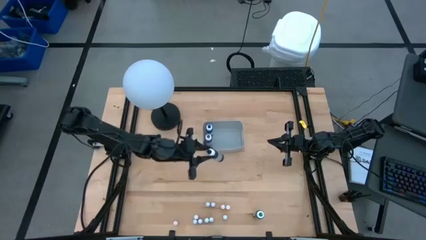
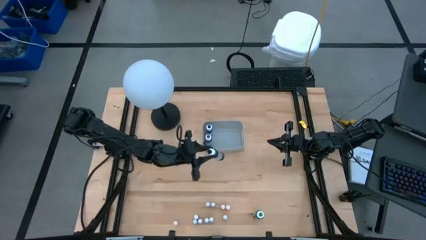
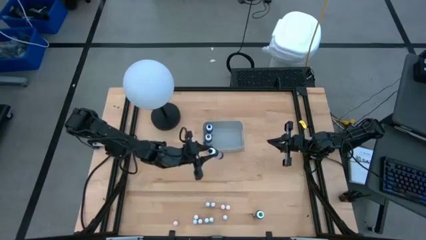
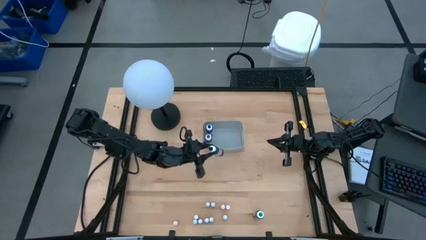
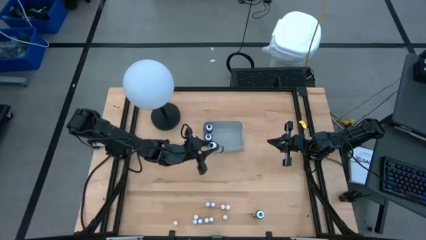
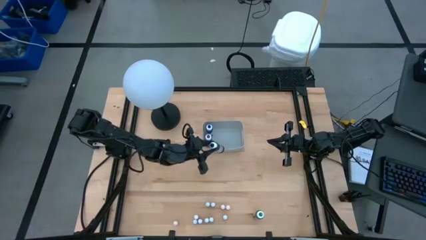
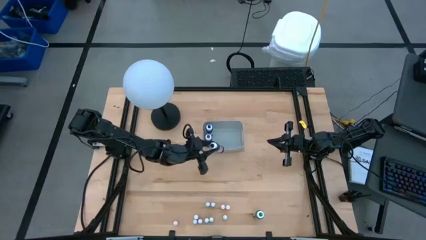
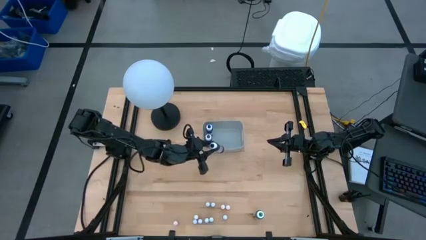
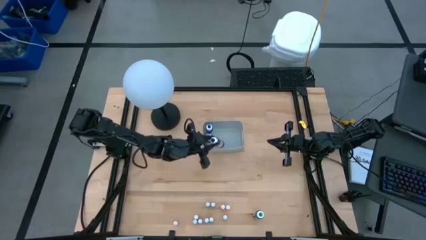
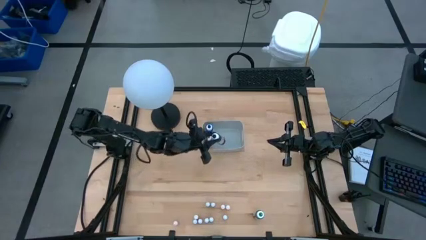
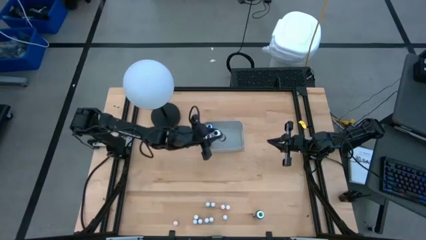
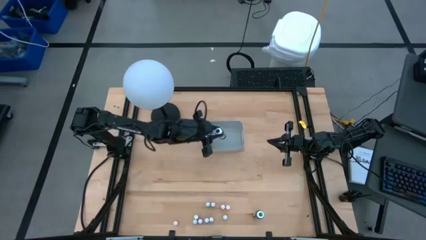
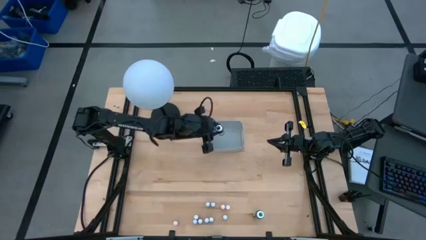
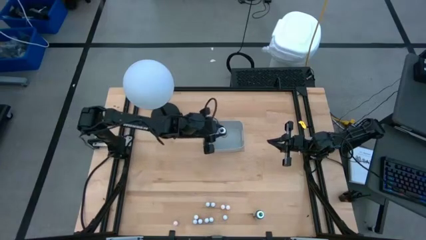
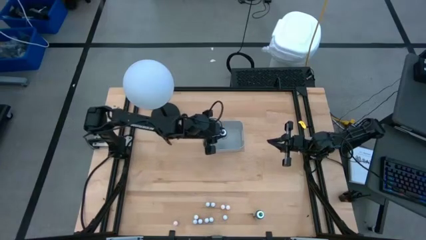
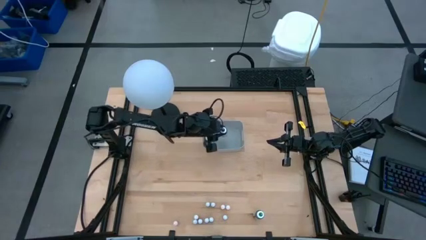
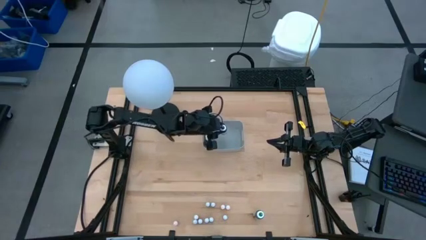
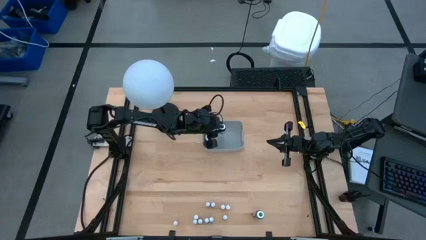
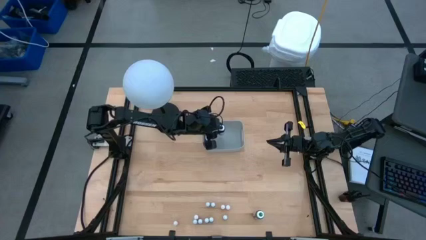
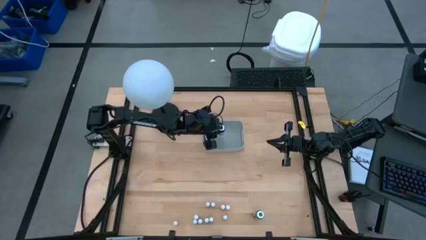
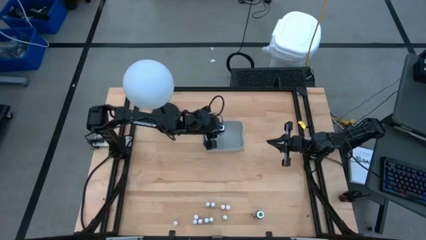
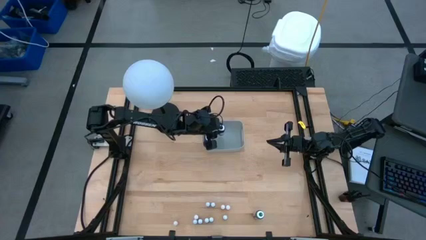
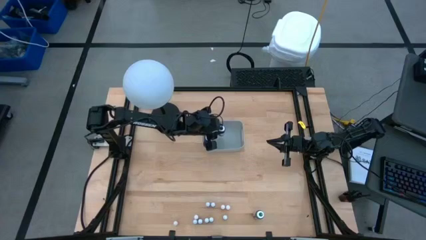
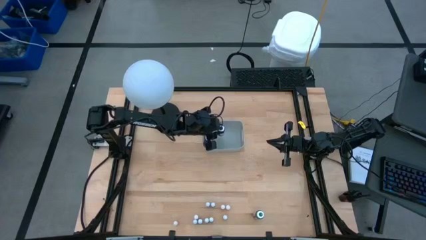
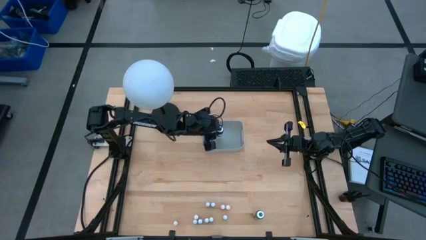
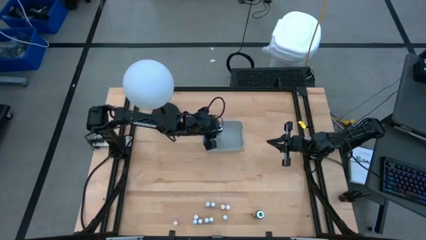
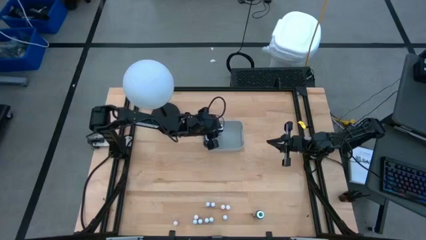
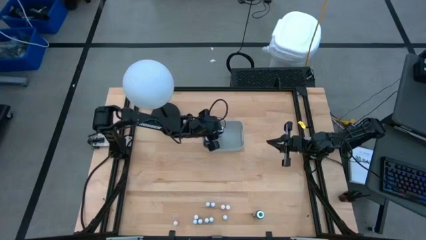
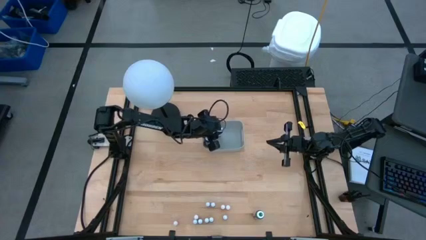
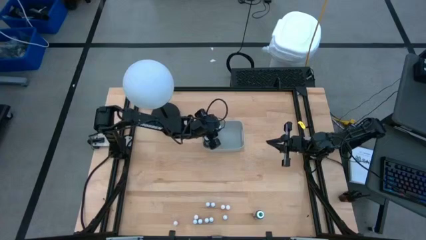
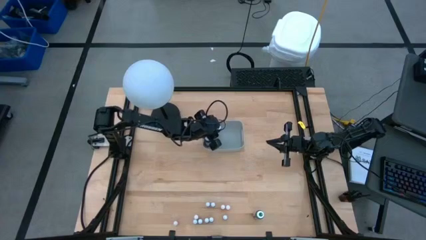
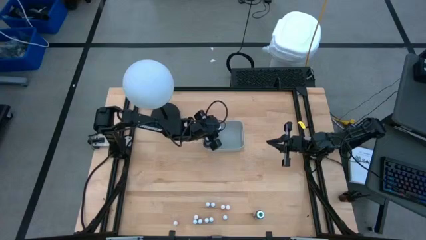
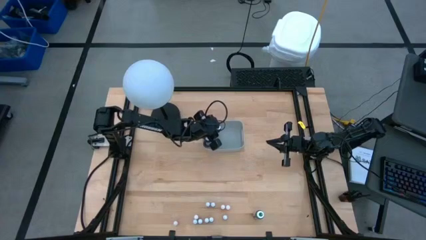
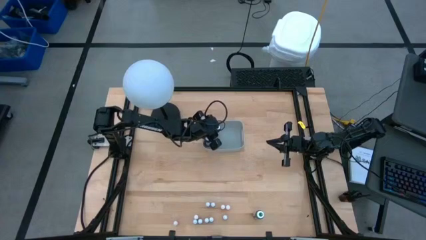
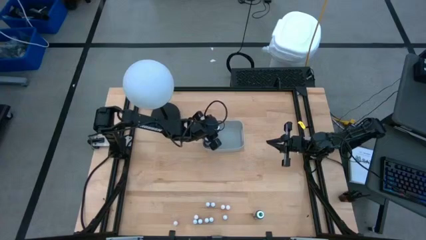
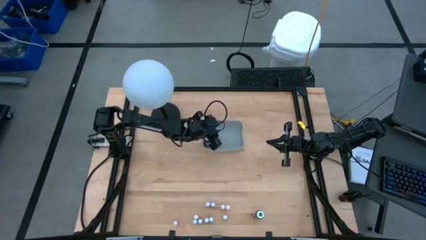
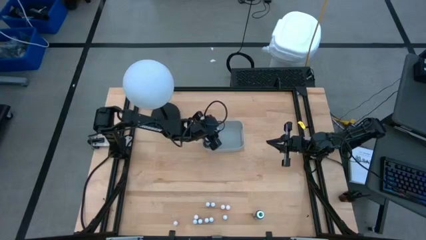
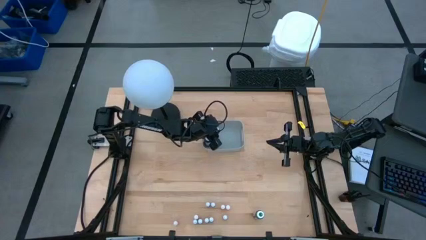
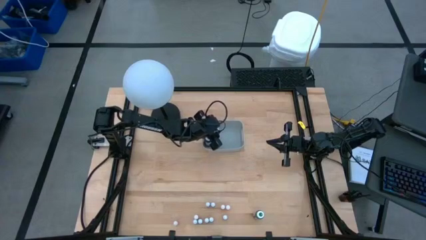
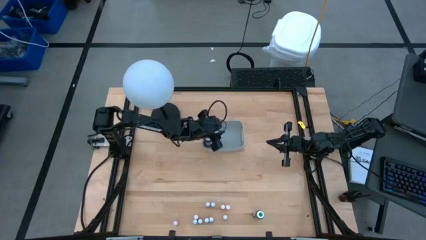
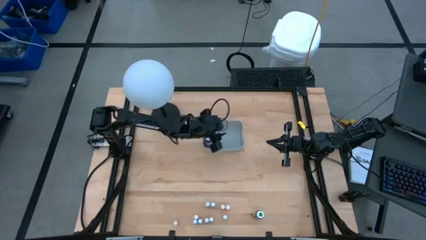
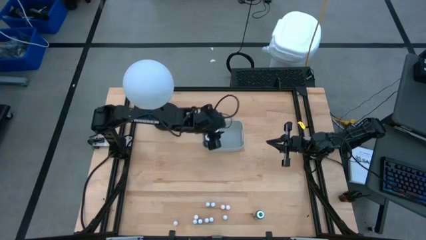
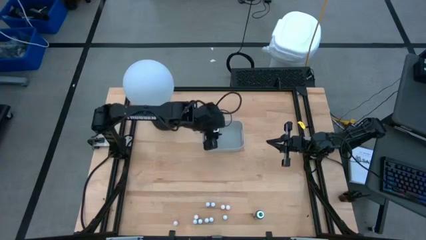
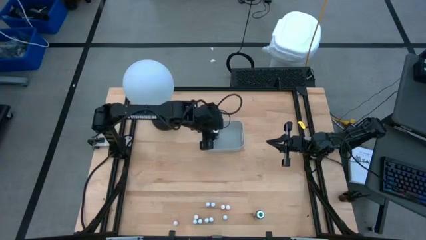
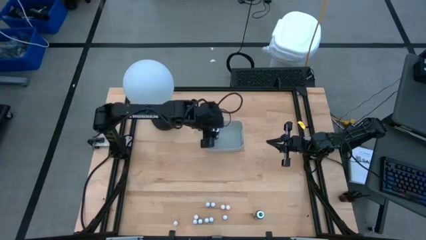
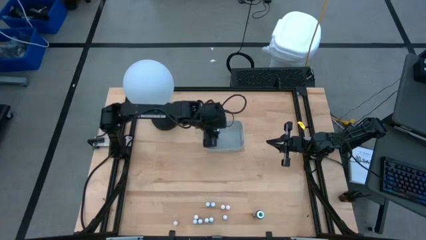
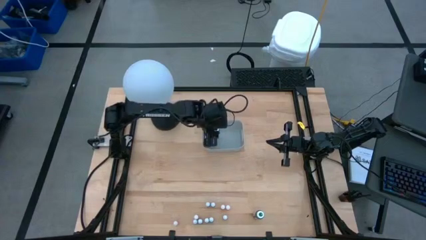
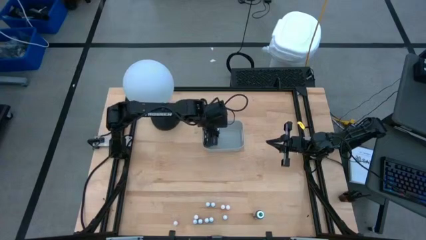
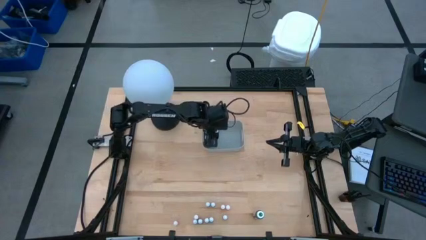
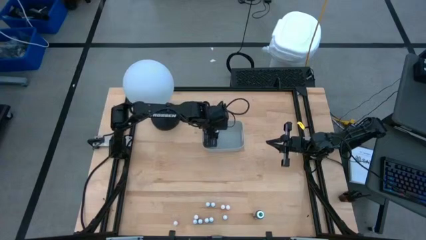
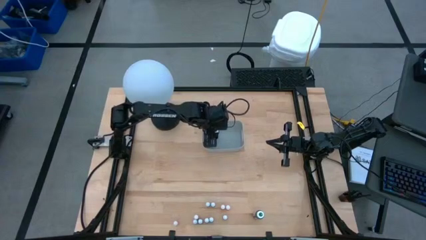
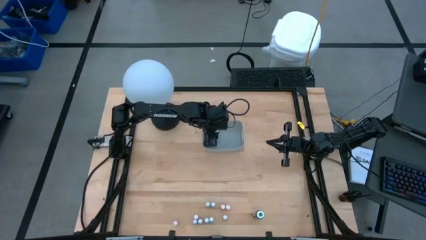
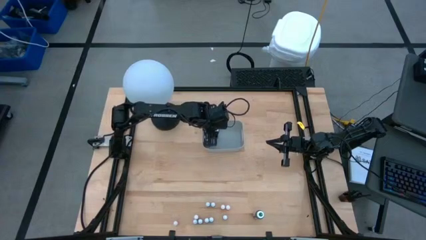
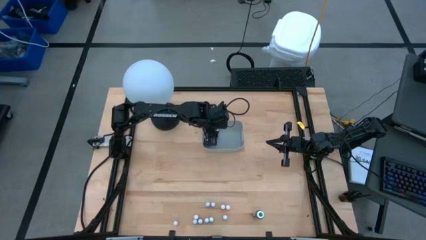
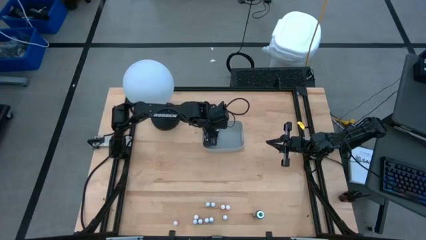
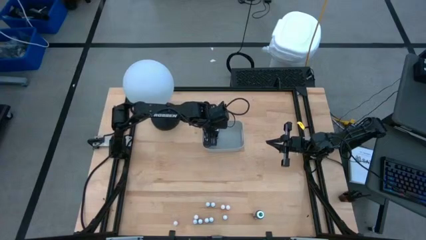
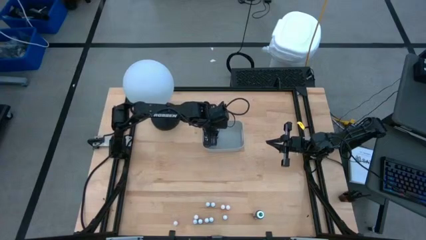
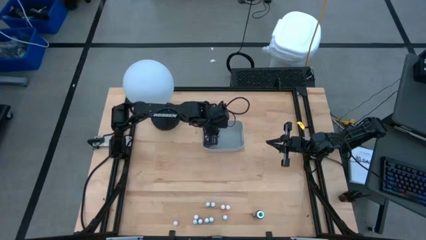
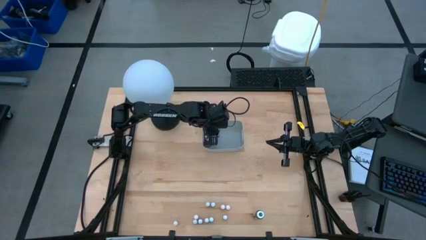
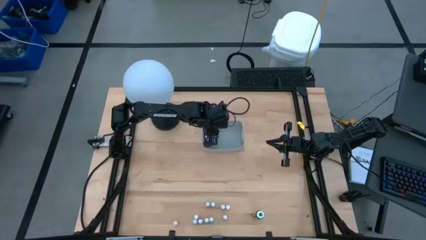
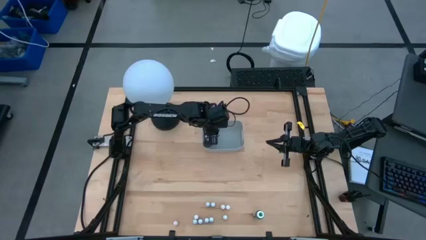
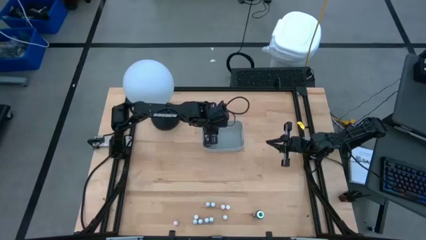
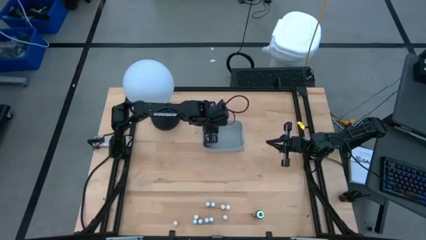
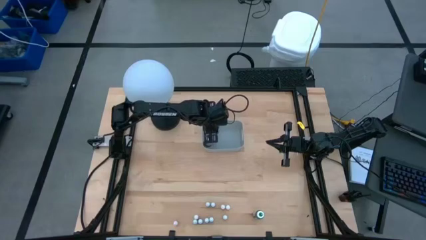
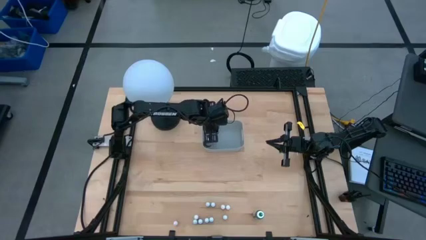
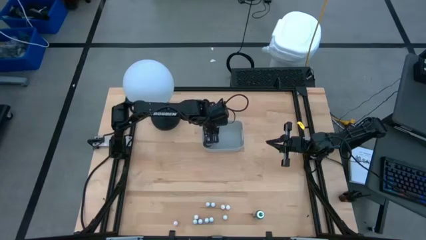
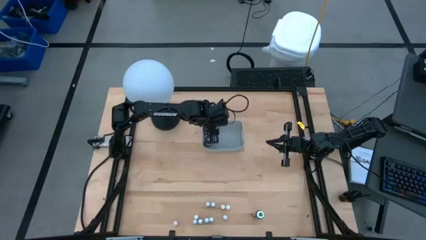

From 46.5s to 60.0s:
Task: Pick & Place food coloring
Put the large black food coloring bottle into the gray bin
